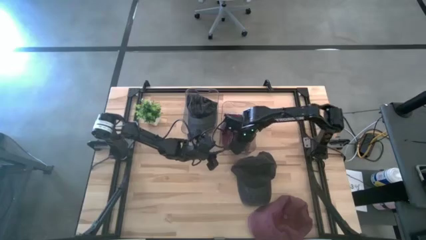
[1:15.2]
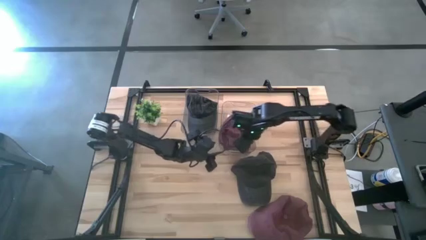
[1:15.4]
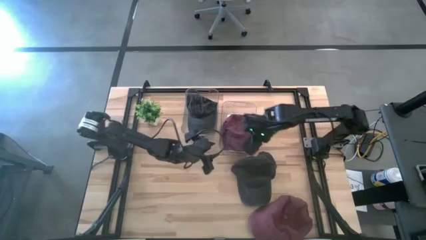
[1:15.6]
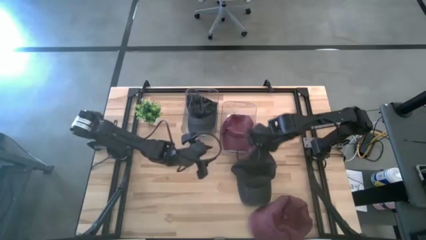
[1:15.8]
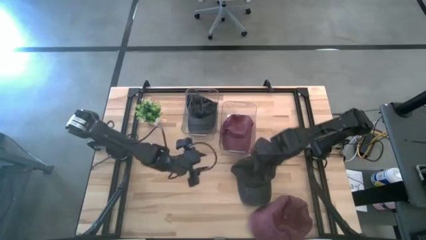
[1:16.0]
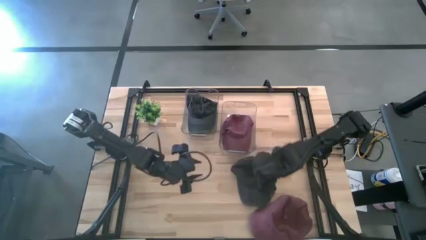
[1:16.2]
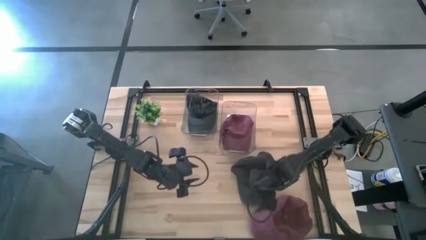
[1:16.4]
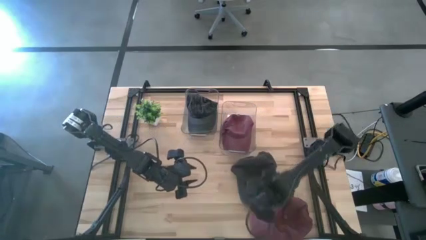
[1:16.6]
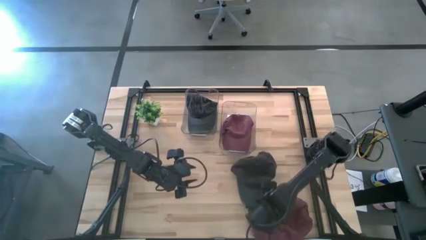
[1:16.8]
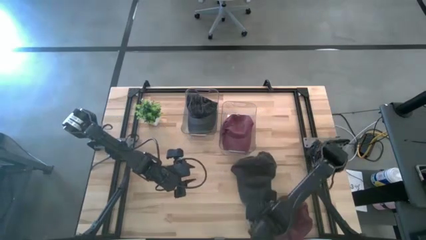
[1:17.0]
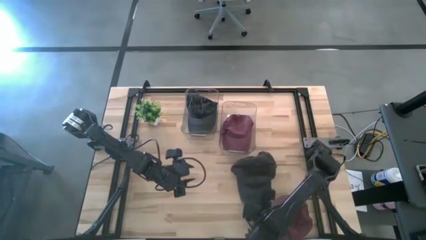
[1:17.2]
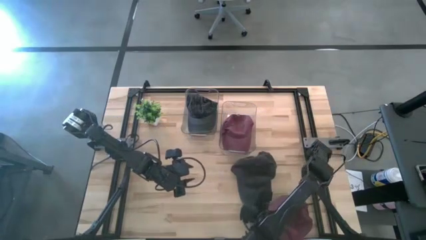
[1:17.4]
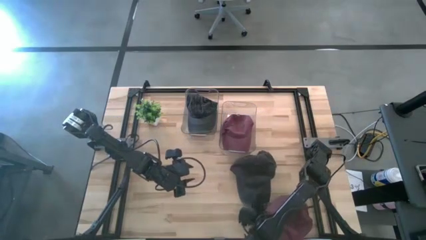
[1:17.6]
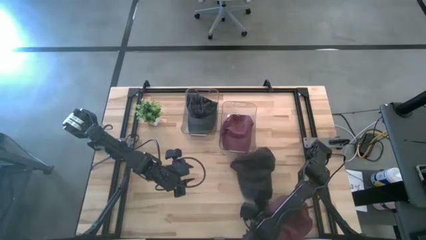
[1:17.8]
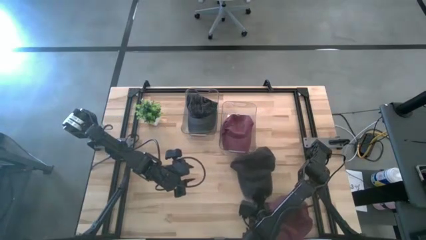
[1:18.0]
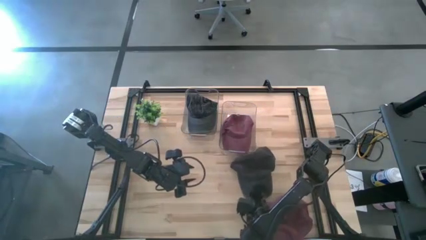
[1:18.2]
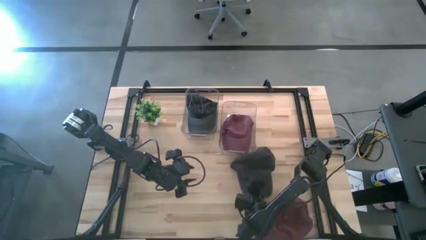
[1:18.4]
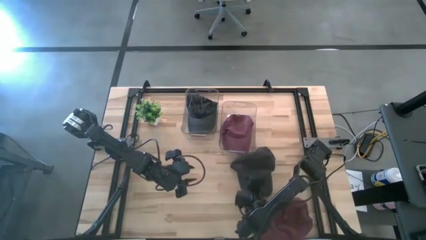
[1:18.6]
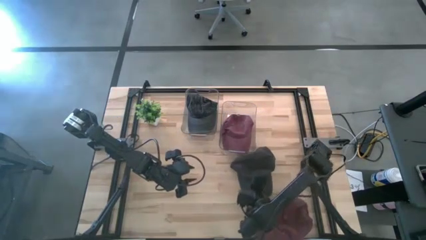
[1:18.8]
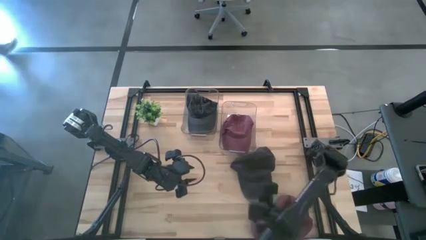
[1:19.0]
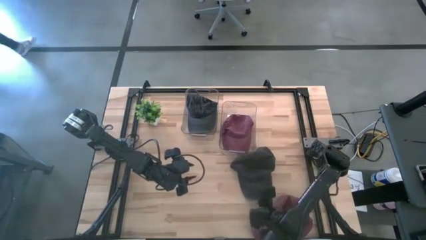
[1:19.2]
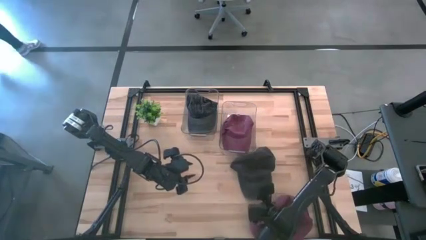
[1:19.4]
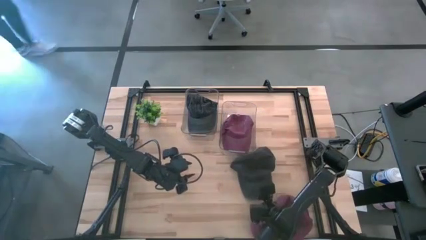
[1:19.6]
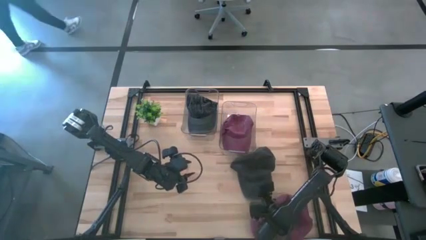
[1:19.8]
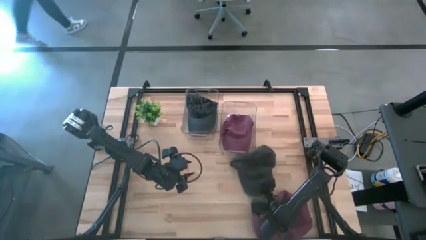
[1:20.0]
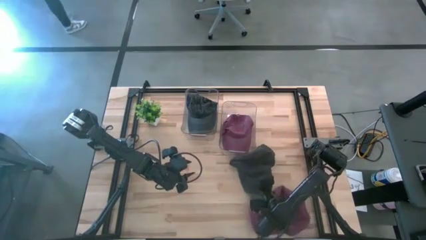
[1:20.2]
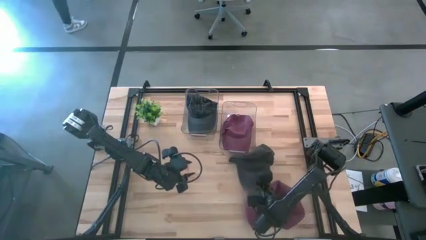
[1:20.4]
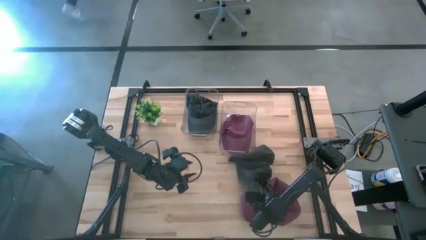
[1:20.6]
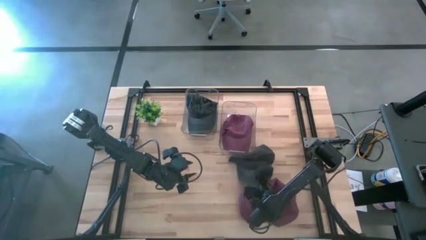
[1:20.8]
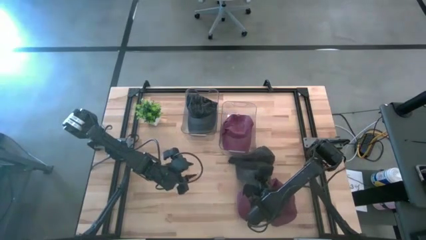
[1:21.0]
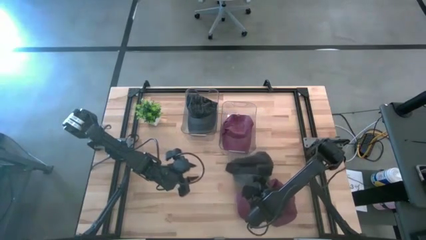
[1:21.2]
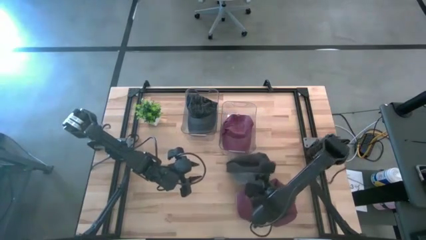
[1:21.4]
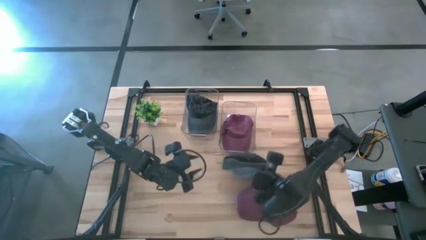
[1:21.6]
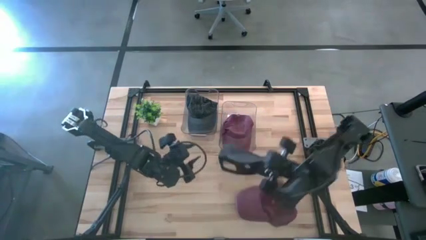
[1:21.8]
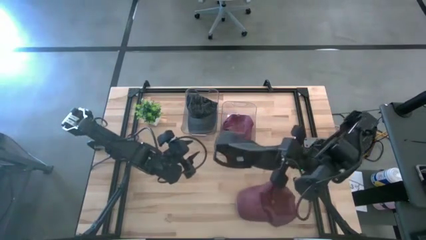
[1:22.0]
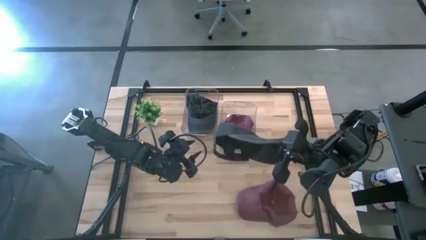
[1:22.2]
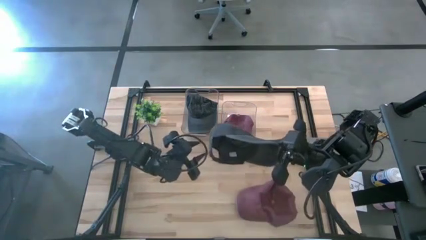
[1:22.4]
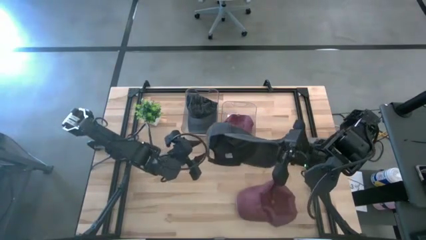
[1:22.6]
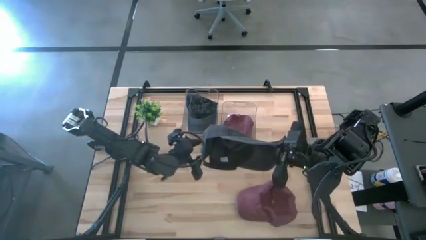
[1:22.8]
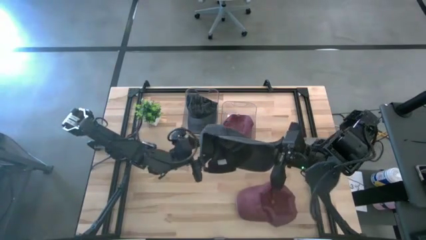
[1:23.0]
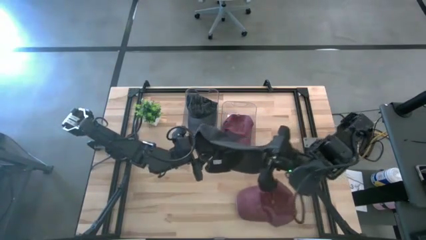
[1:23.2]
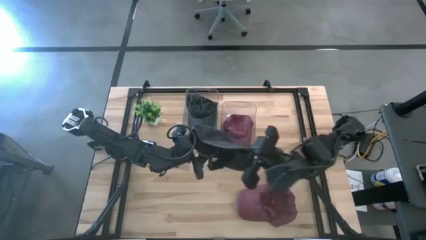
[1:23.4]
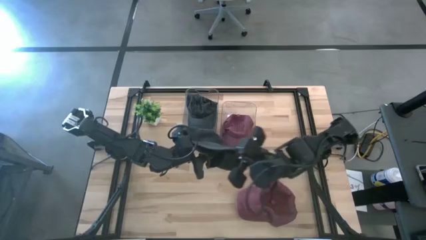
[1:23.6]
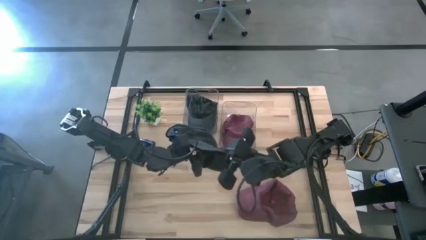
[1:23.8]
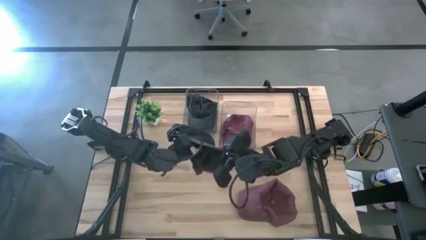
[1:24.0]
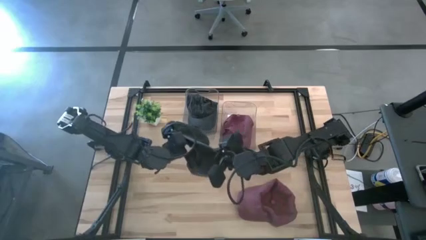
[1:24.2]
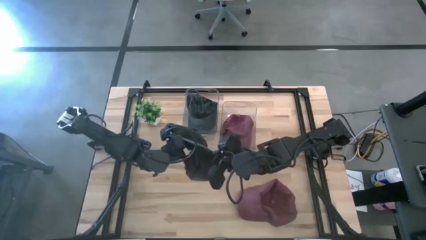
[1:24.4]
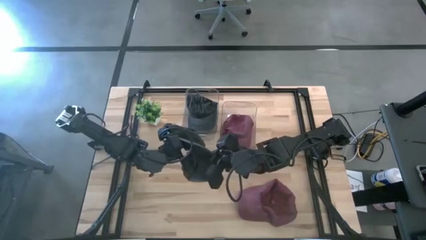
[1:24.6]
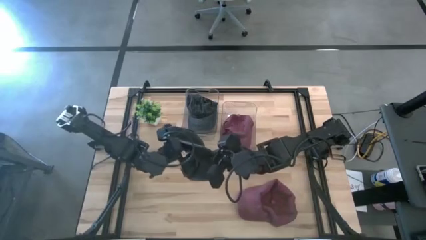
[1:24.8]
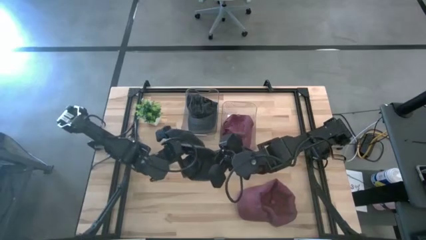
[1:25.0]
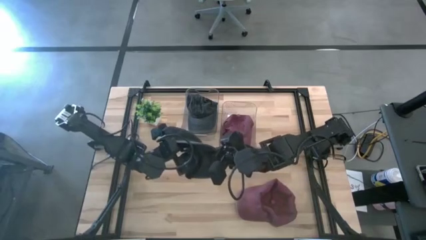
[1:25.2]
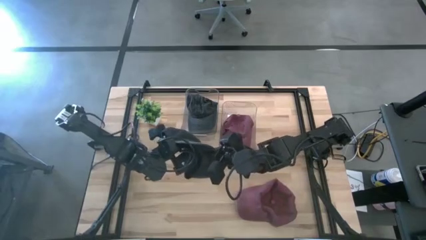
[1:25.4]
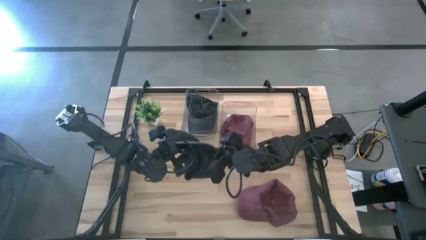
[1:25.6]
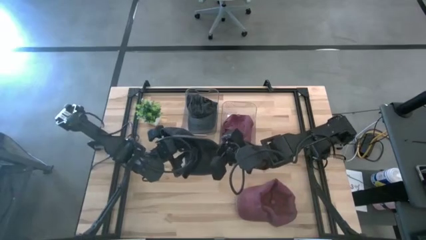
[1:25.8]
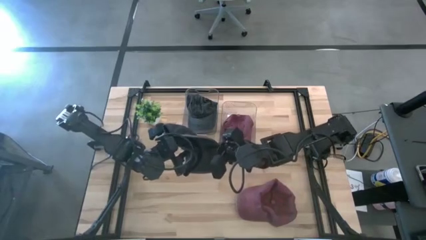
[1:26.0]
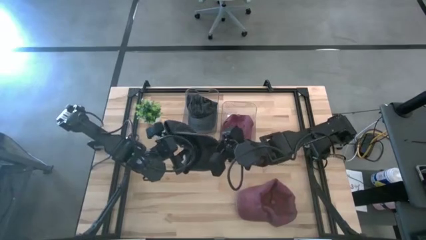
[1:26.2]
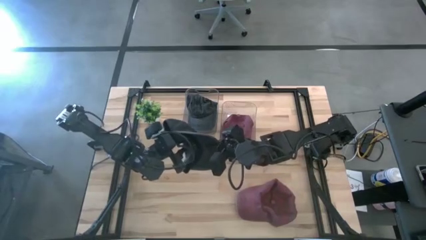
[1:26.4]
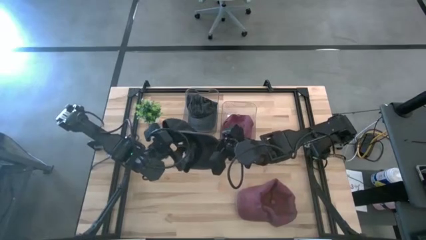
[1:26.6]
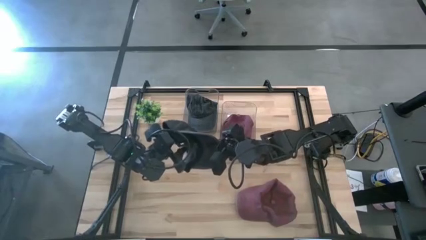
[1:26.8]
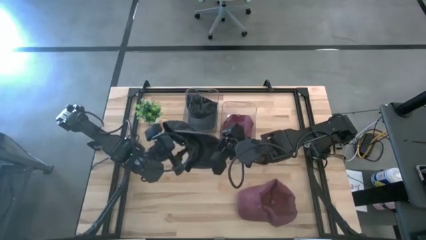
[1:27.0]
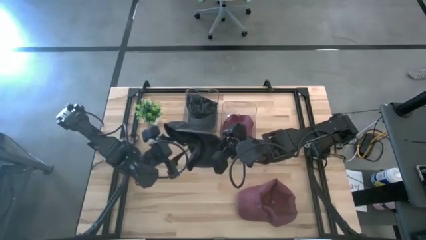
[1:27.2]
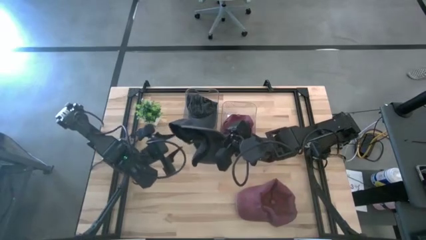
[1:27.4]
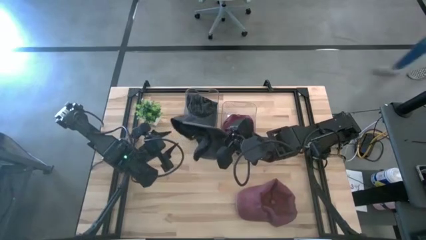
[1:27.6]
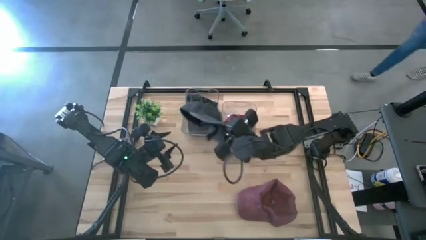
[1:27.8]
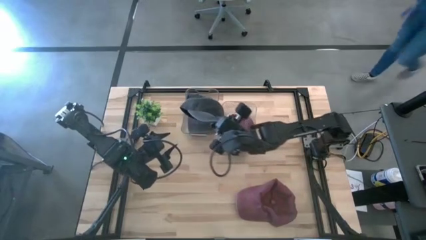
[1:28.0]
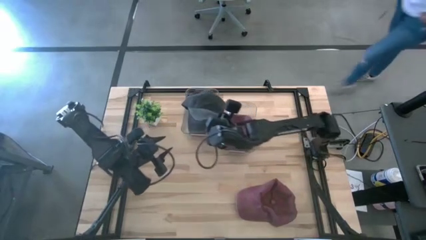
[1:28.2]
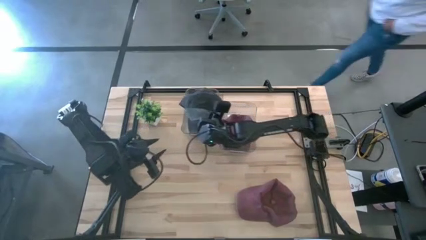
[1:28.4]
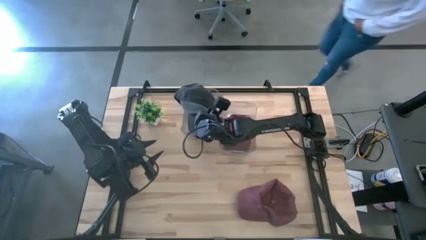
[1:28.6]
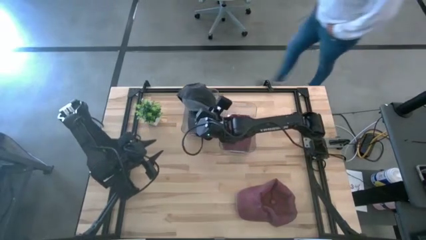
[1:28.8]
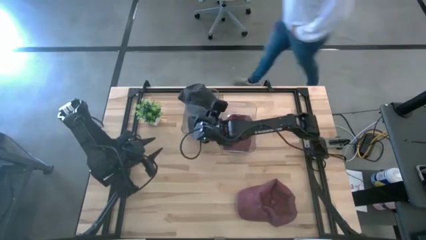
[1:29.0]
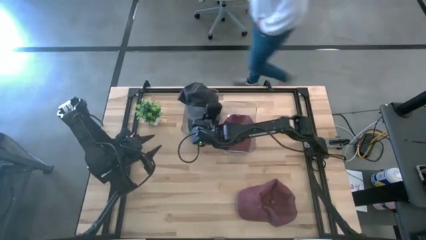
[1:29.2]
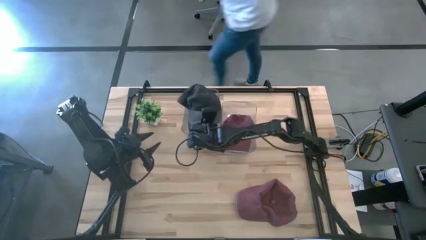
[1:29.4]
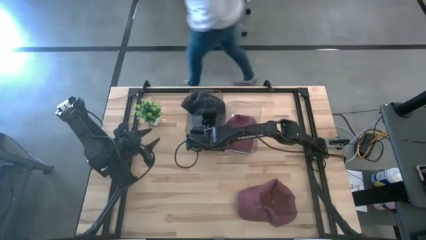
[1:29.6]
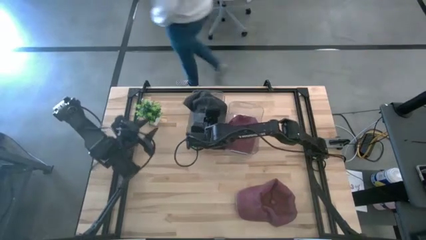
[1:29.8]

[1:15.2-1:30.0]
Task: Pick & Place hat
Put the black cap into the left transparent bin

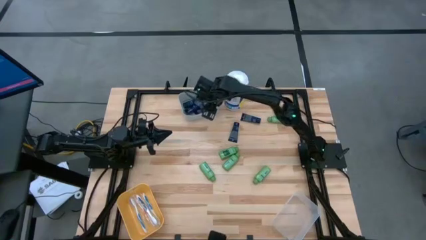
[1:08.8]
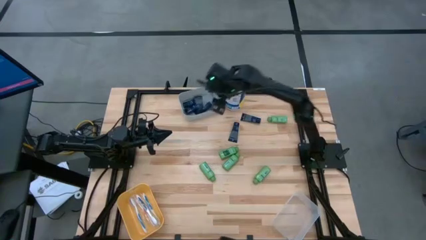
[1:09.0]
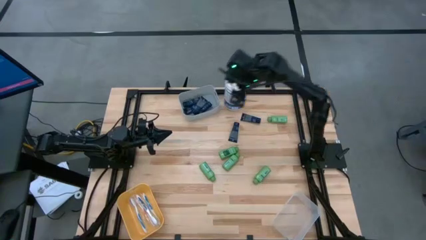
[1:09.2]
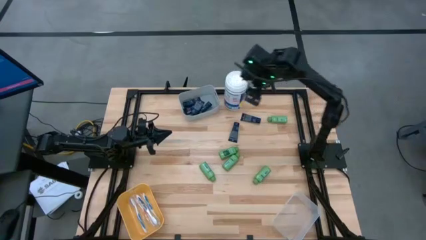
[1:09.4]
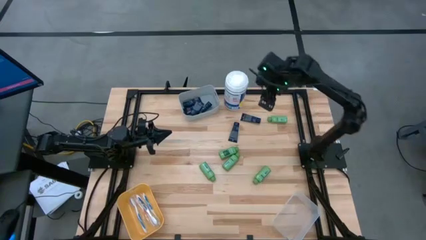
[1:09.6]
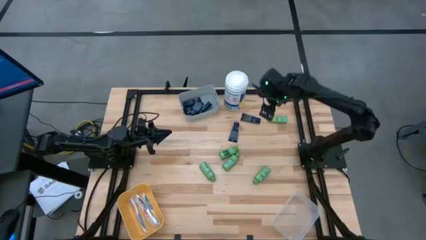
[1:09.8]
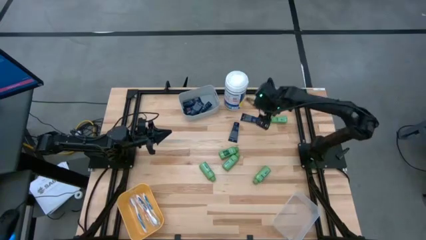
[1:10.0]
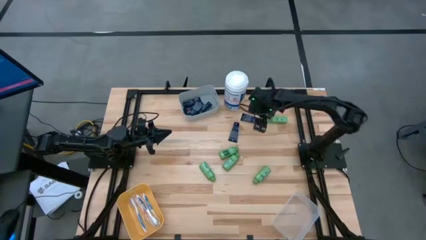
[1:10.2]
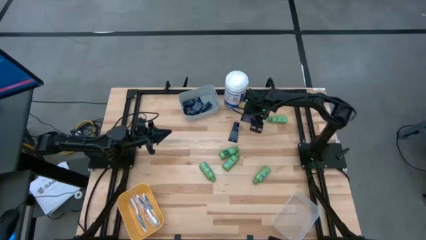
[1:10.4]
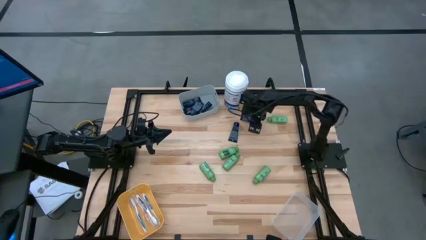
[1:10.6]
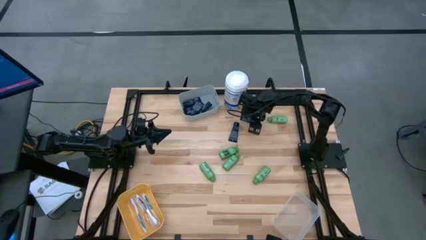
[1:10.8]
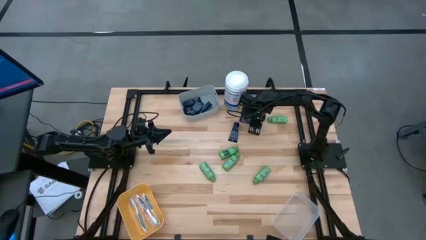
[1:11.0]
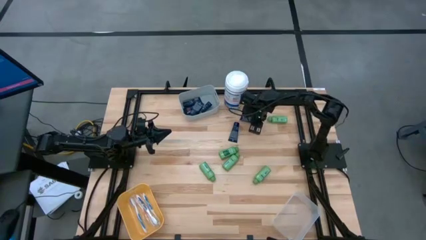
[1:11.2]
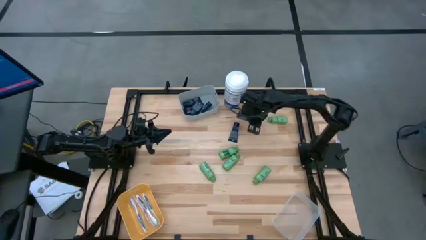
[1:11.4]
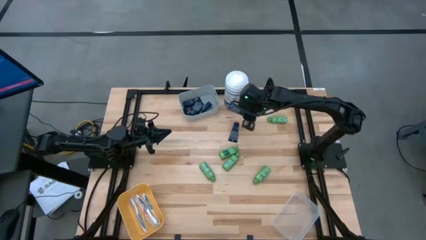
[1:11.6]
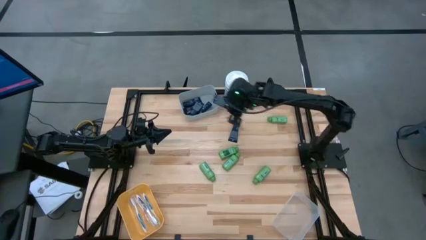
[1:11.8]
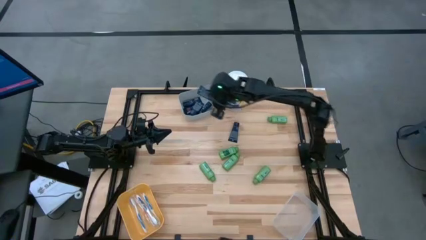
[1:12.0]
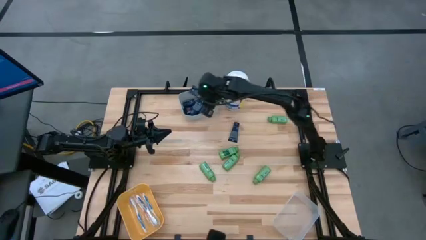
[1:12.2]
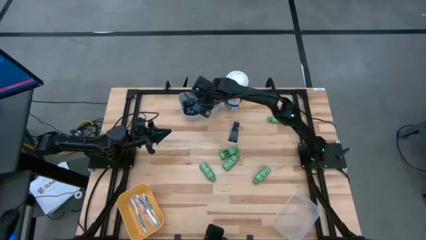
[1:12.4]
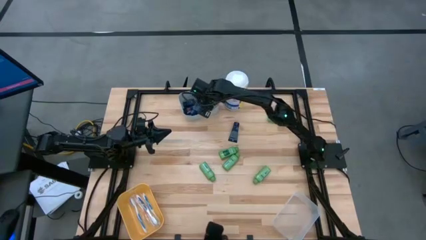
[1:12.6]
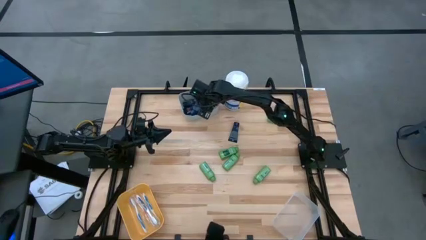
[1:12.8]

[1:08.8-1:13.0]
Task: Pick & Place Travel size toiletries
Put the dark blue shave cream into the gray bin
